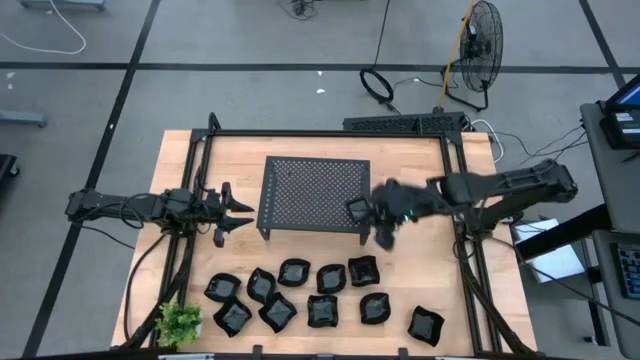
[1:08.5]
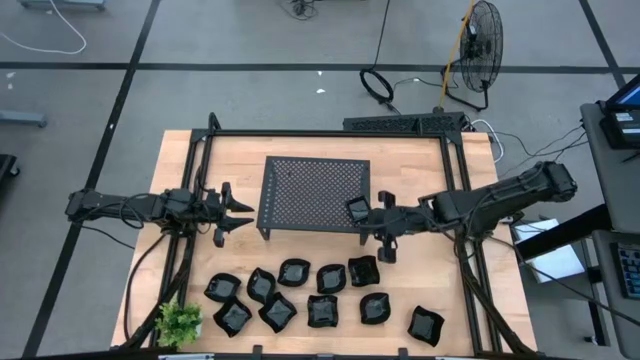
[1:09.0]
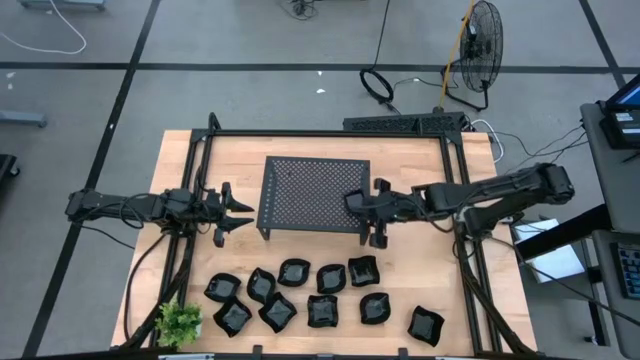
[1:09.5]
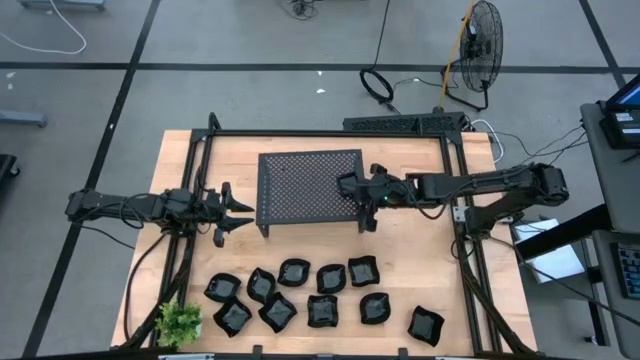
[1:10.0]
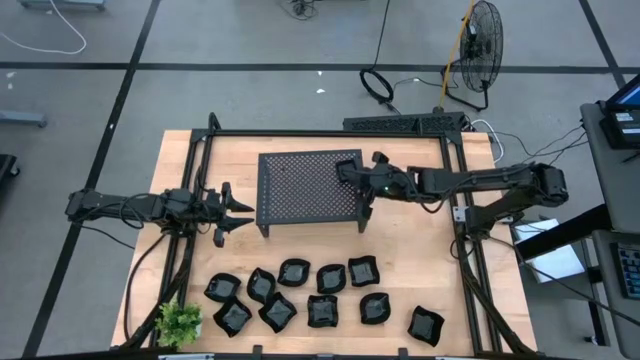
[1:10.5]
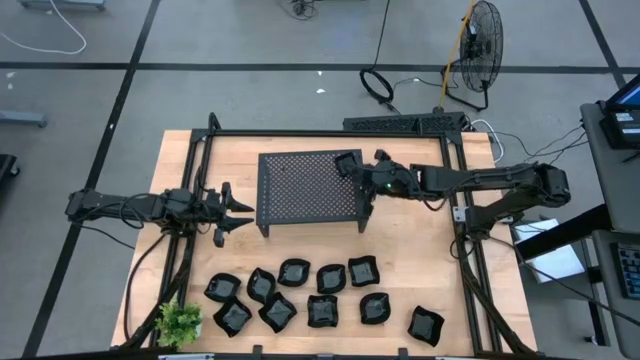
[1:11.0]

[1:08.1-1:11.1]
Task: Pick & Place Mini shaped plates
Adjust the stacked square plates on the shelf

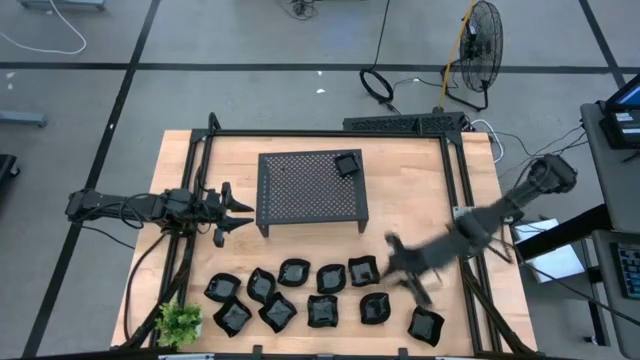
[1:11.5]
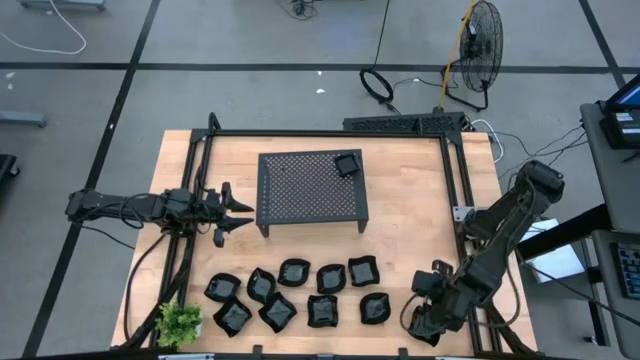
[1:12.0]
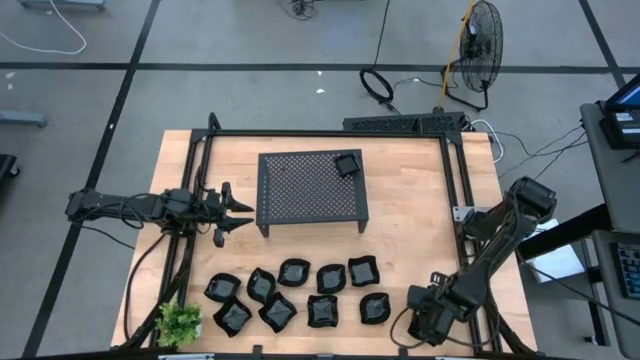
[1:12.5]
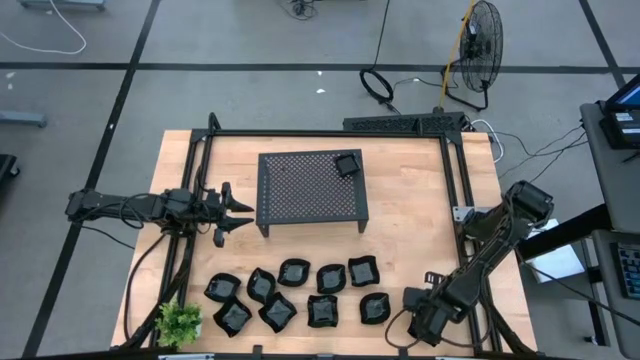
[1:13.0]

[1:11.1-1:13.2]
Put the distorted square plate on the shelf

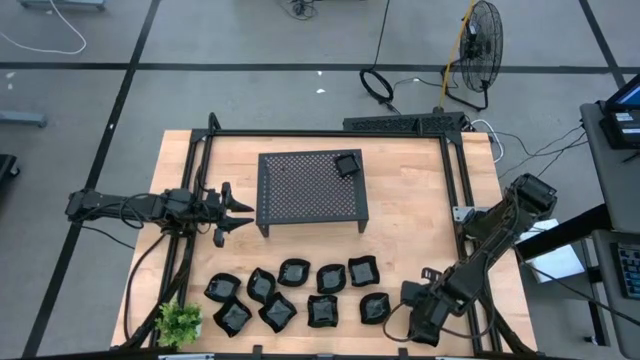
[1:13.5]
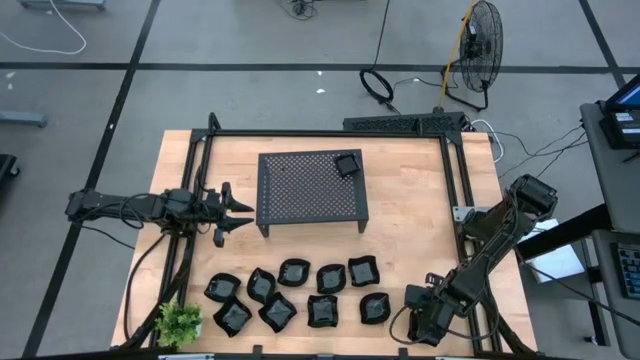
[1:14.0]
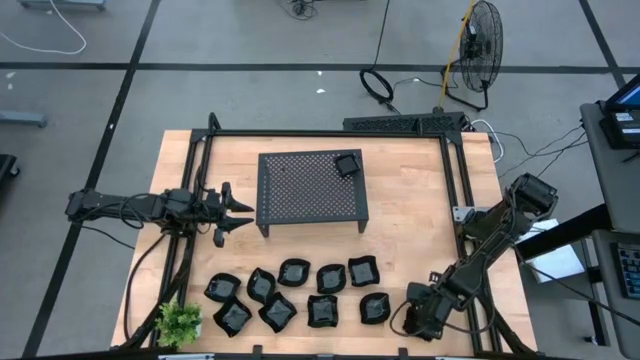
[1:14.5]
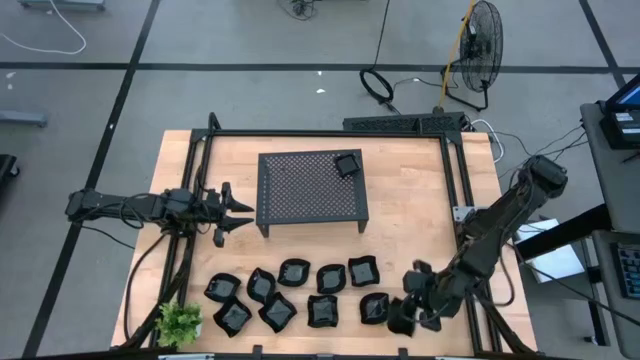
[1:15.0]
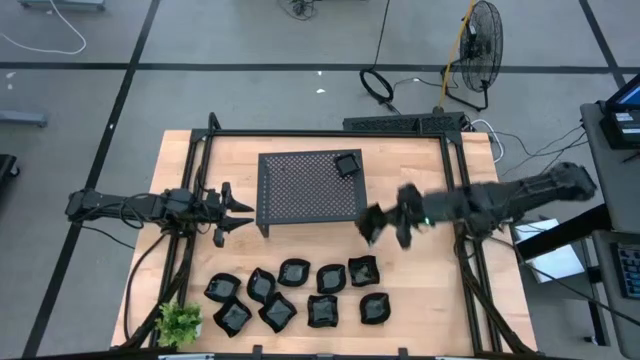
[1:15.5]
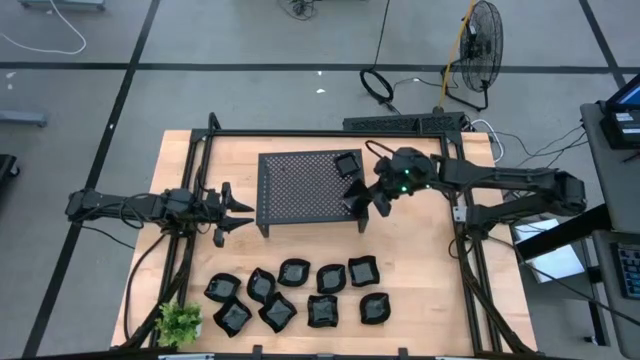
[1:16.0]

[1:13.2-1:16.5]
Put the distorted square plate on the shelf

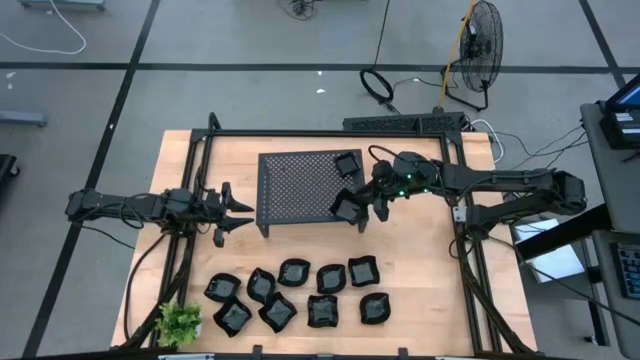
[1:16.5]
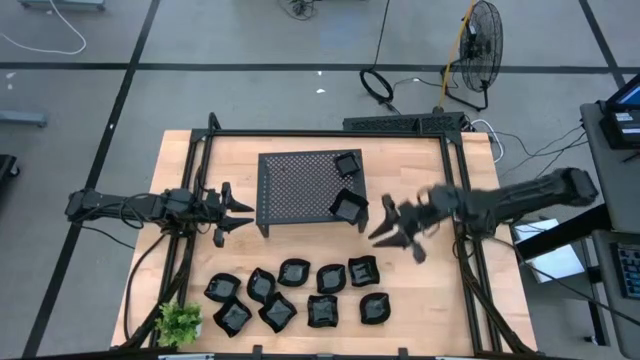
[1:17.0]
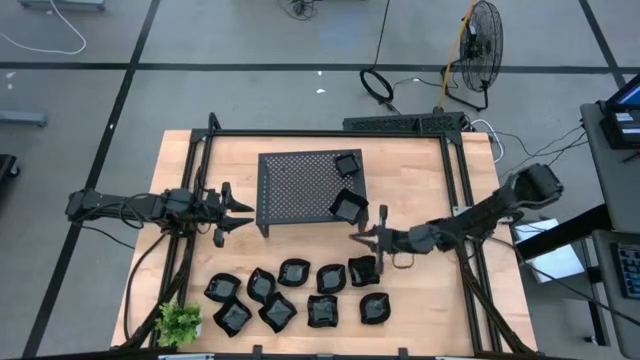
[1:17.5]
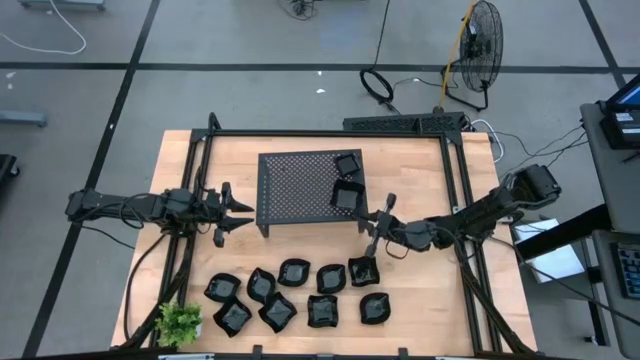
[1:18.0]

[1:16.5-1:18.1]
Adjust the distorted square plate on the shelf

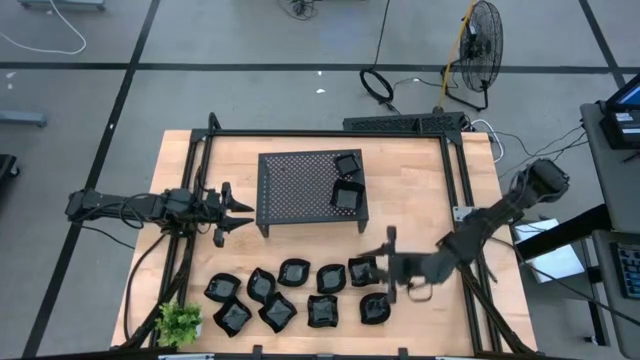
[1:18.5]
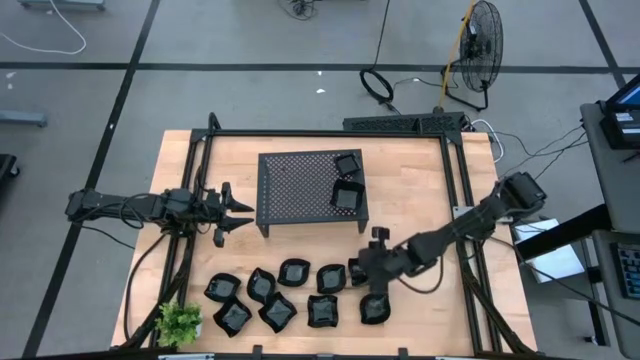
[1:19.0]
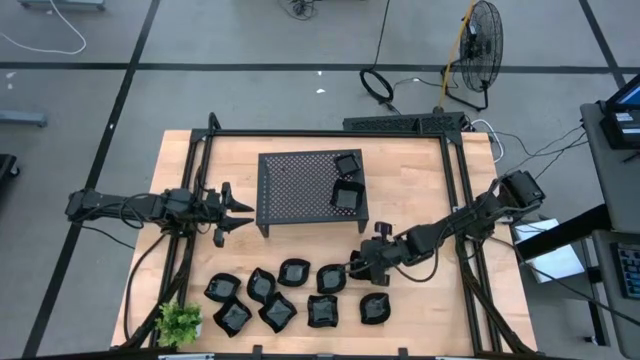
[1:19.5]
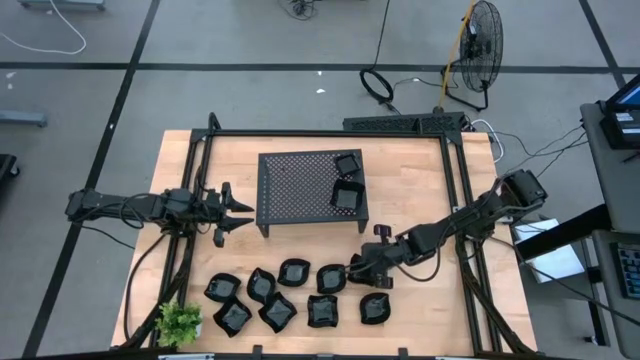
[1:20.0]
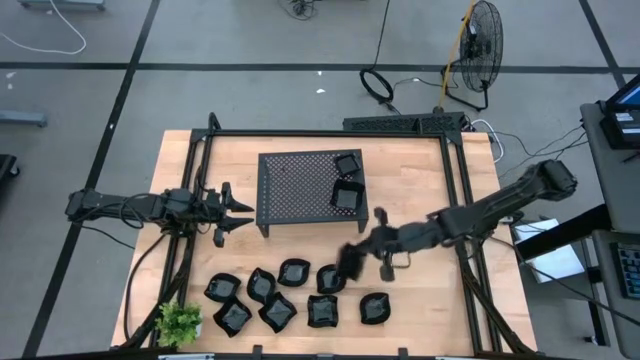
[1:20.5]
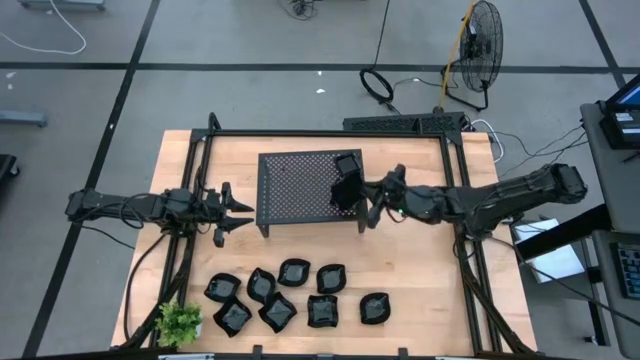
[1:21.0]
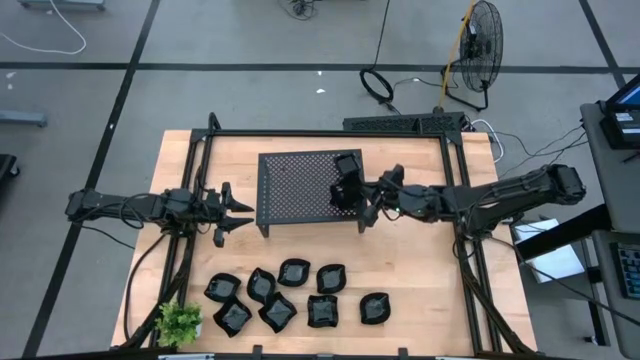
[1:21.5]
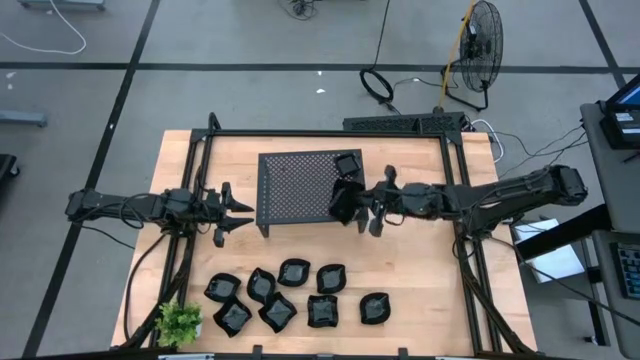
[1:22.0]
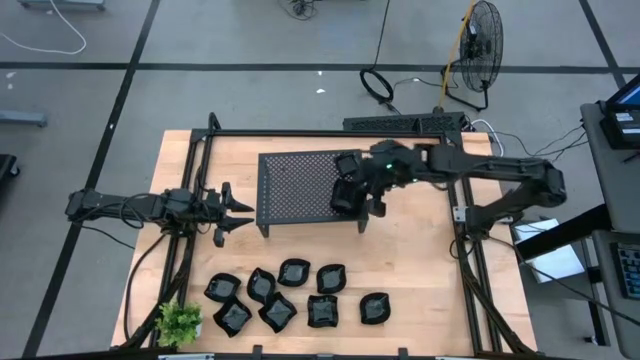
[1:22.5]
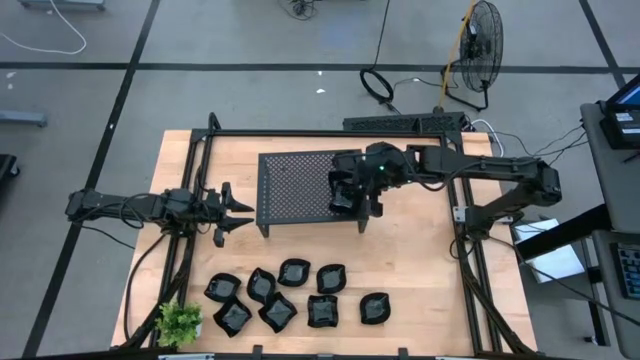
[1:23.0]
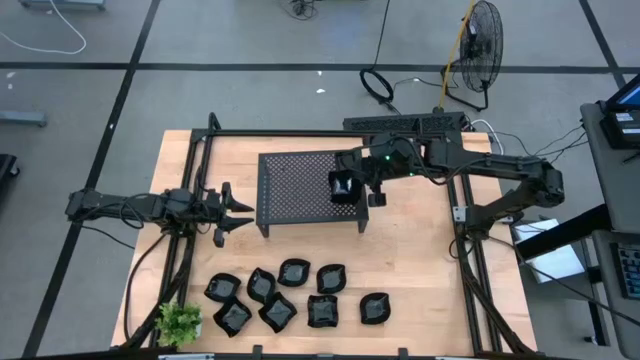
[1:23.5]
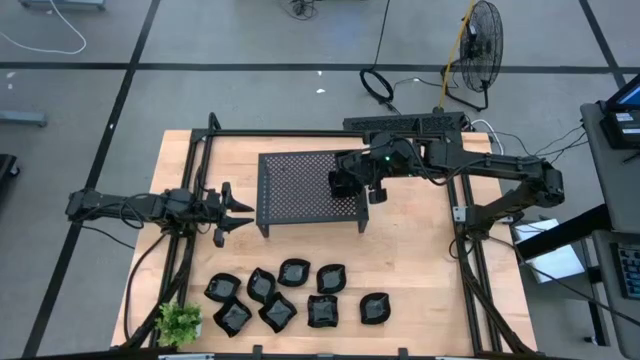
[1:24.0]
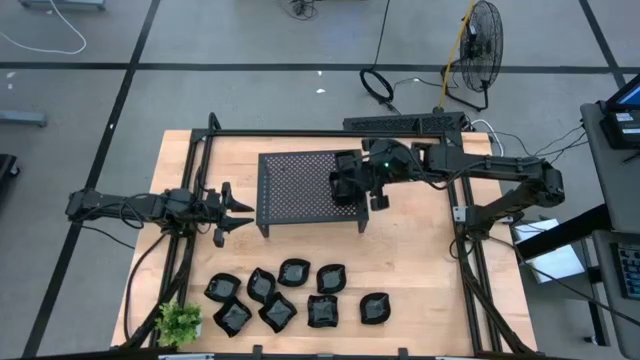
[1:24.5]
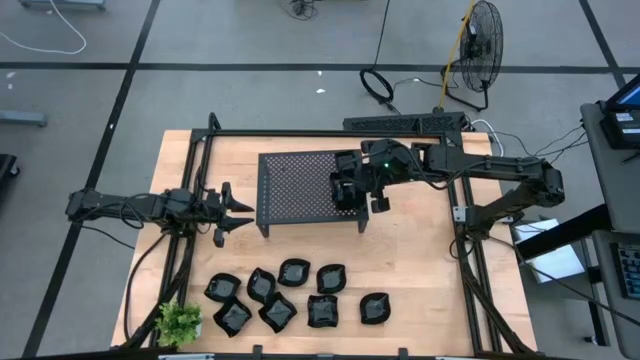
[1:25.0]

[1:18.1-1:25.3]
Stack the distorted square plate on the other distorted square plate on the shelf

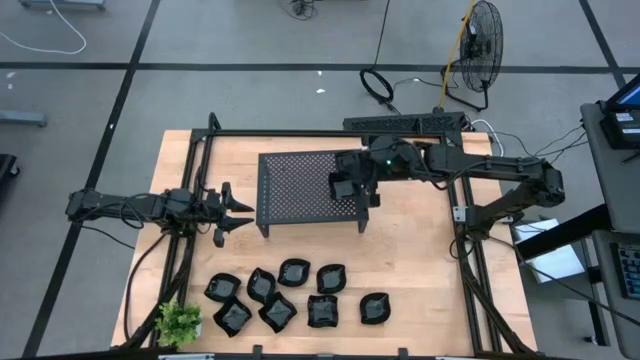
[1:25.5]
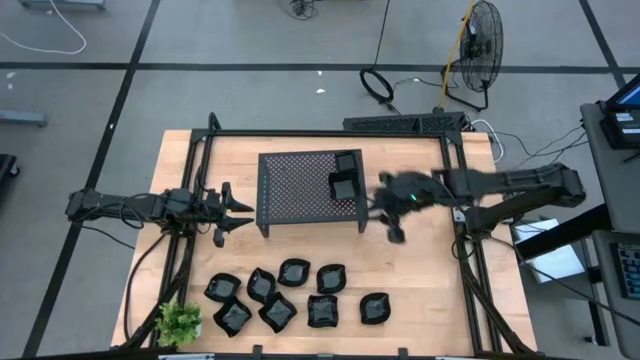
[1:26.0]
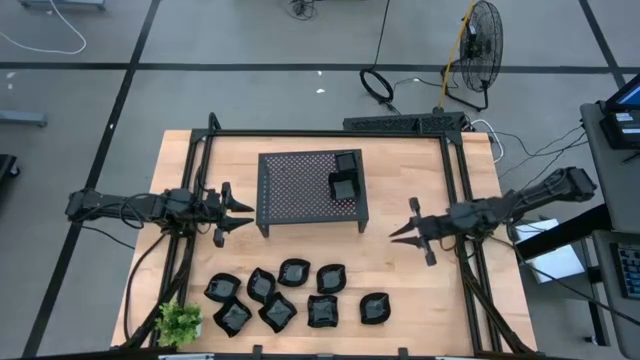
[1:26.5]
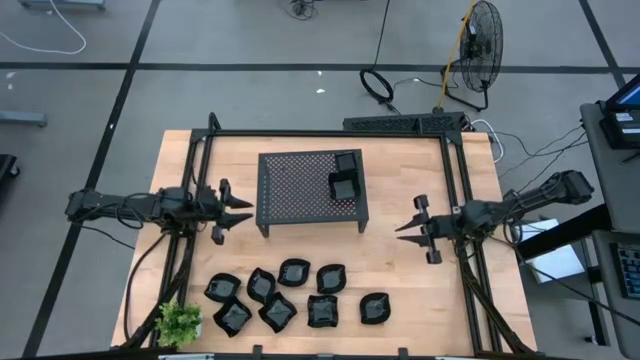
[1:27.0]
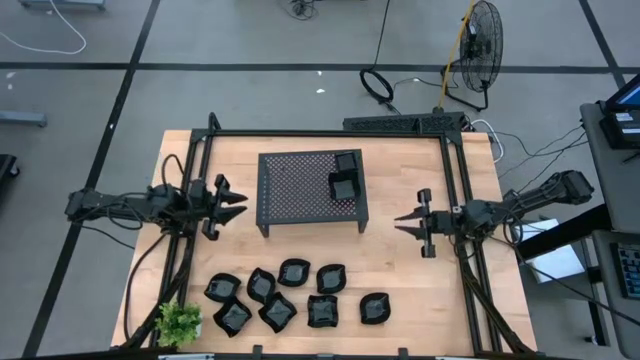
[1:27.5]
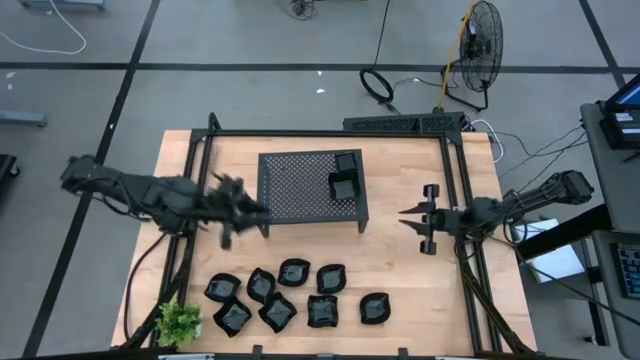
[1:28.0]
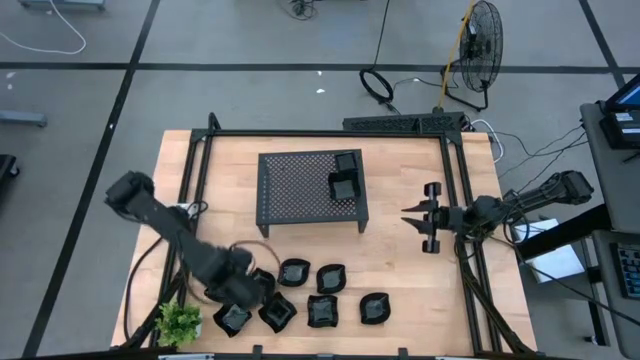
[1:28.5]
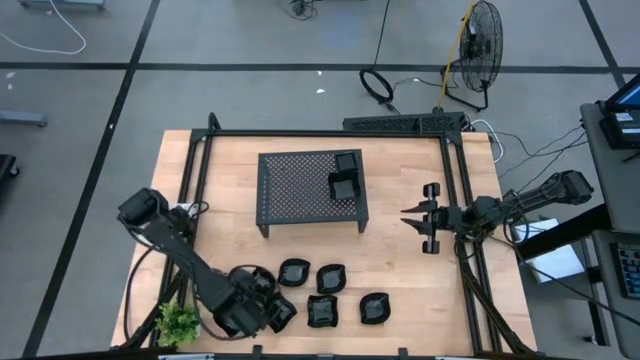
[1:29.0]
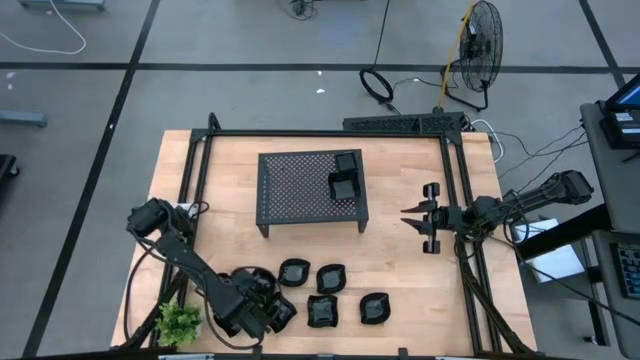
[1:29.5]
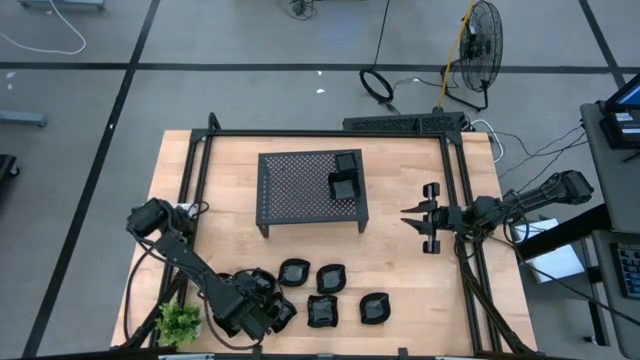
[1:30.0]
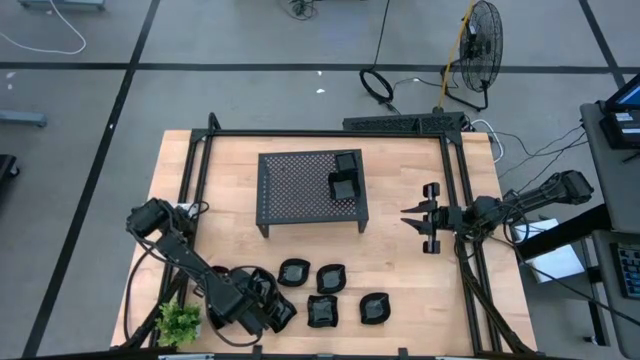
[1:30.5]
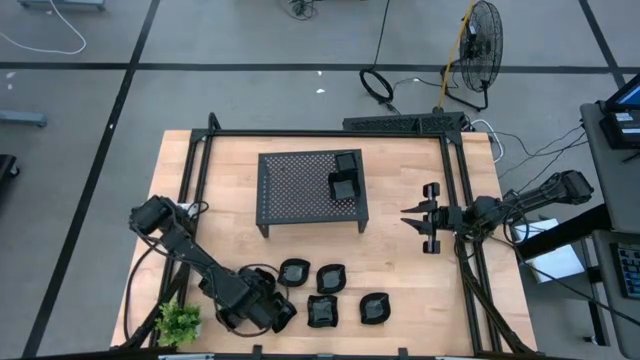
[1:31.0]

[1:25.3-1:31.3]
Stack the distorted square plate onto the stacked distorted square plate on the shelf
